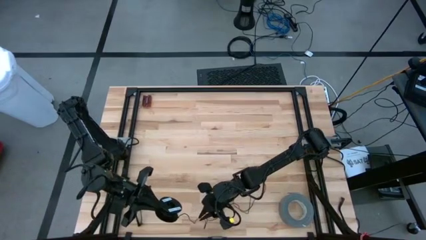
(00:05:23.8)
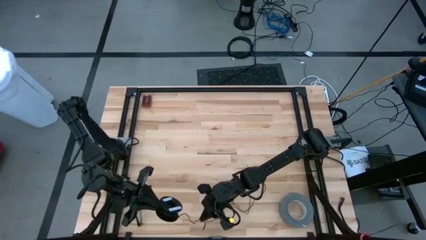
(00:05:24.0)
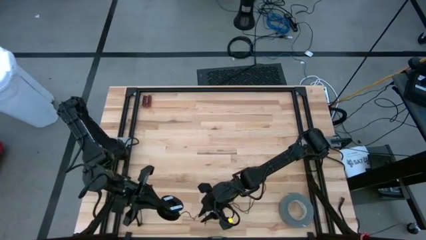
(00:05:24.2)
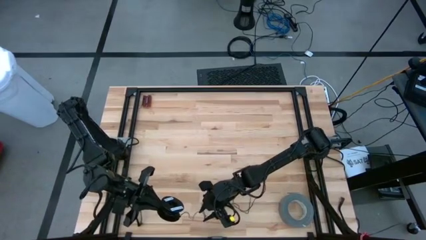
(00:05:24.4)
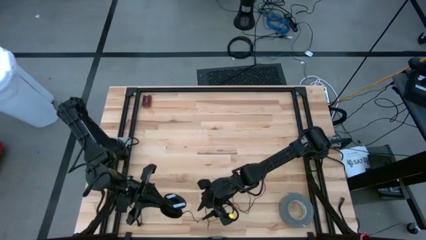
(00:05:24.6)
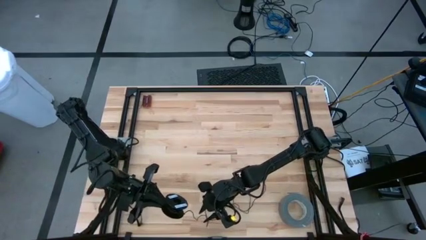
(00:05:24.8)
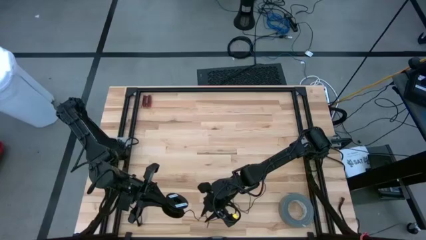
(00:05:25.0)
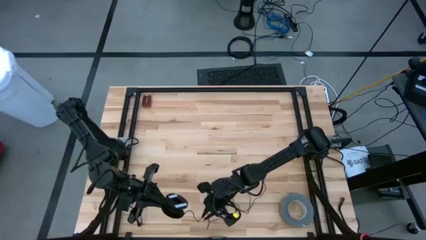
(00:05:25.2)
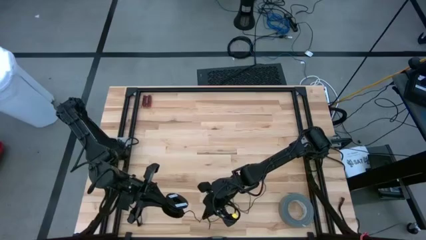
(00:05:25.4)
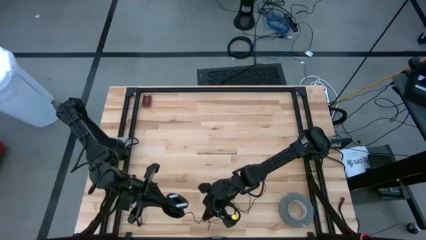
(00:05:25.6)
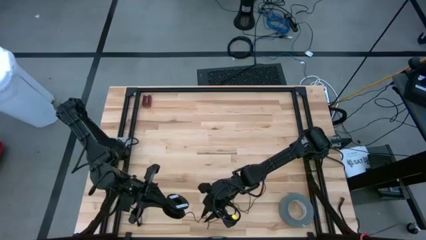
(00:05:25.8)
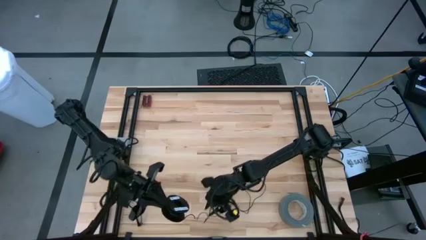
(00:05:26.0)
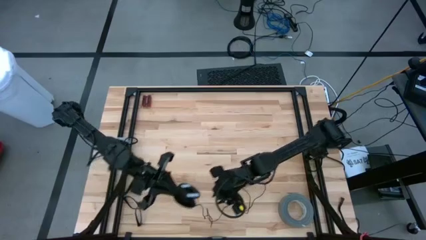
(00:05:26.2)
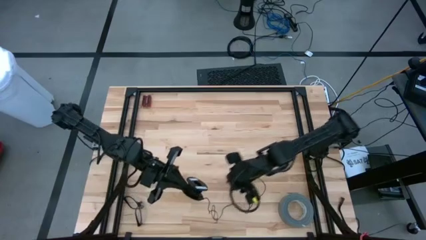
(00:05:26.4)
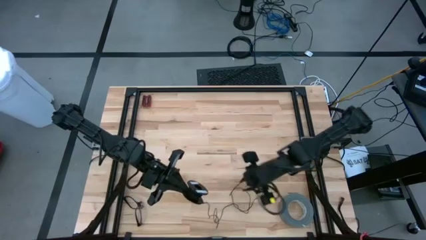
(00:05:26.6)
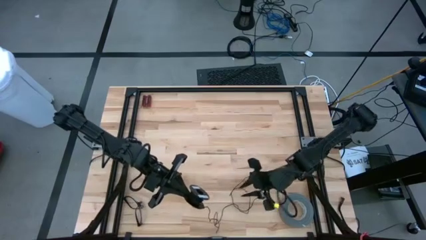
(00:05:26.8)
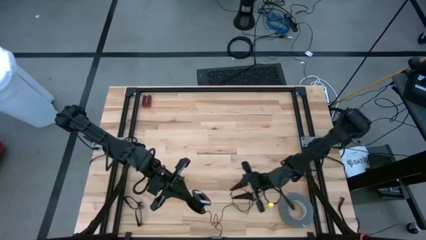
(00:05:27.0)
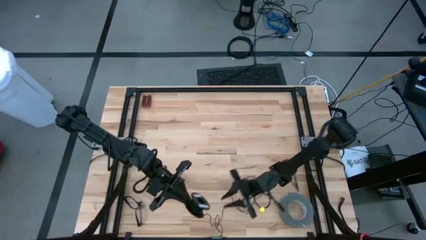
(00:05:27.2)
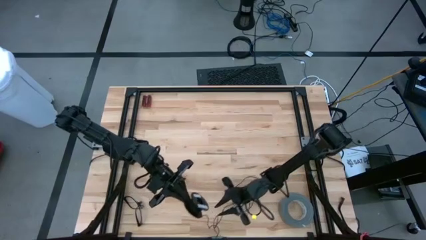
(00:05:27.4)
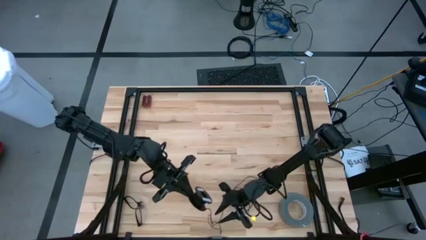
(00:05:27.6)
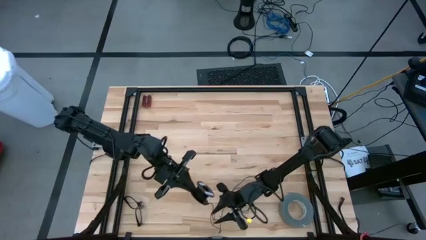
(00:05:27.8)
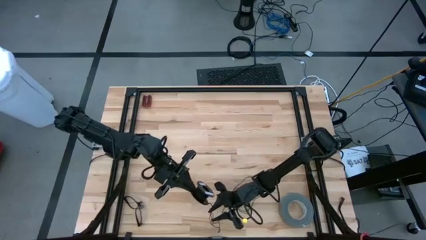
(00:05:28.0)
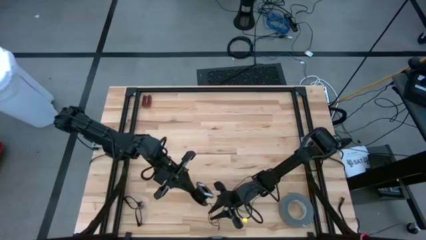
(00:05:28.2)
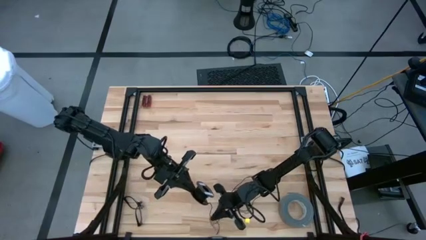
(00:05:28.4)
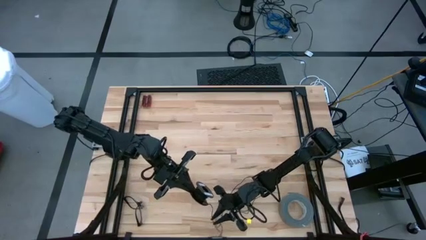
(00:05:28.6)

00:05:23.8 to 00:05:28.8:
Task: Coil cords
Coil the black wire on the spool

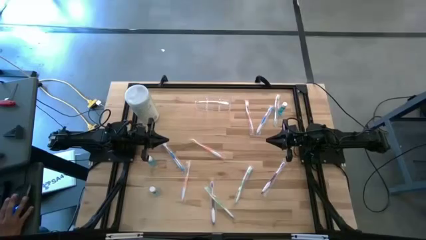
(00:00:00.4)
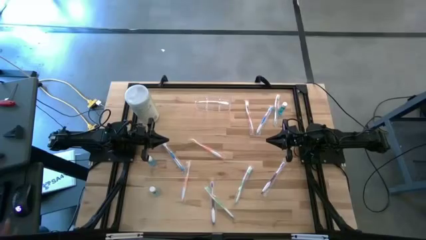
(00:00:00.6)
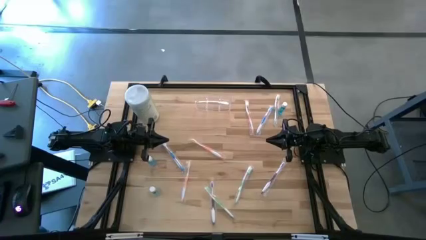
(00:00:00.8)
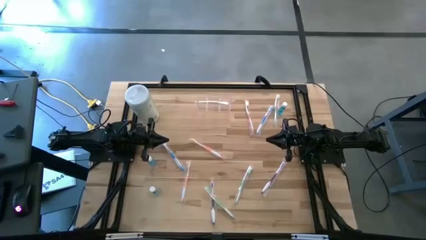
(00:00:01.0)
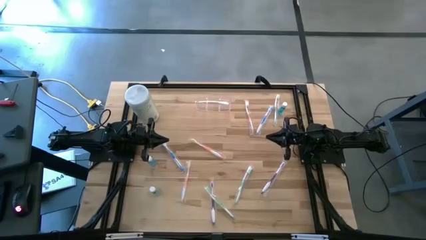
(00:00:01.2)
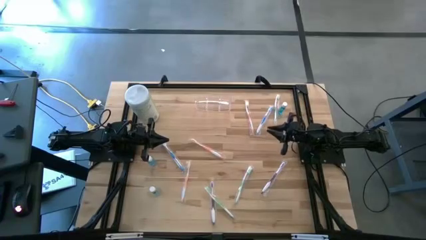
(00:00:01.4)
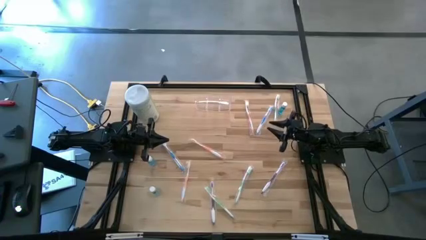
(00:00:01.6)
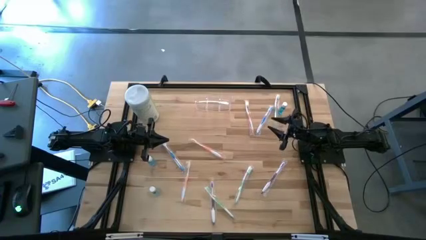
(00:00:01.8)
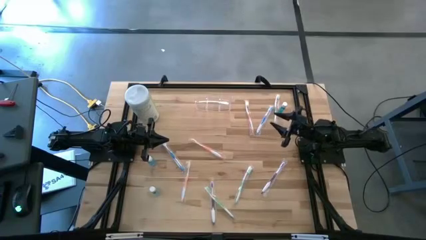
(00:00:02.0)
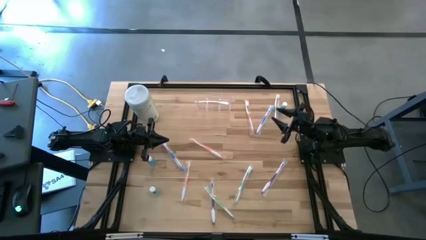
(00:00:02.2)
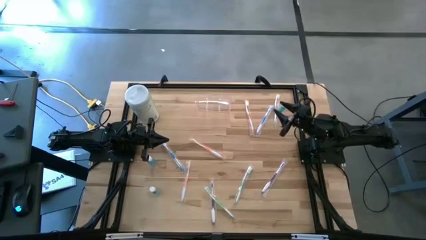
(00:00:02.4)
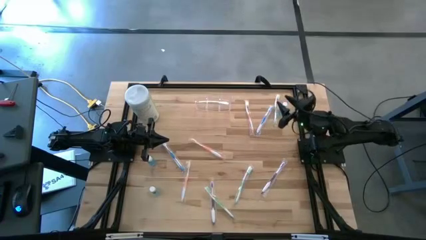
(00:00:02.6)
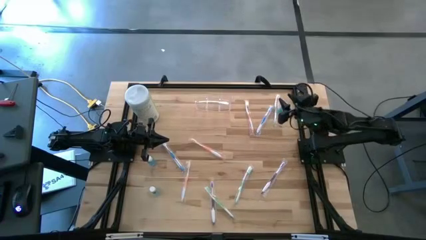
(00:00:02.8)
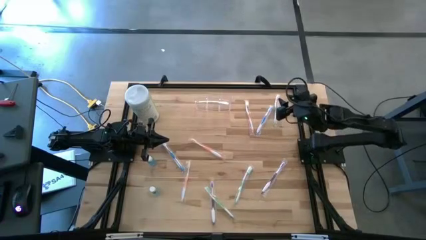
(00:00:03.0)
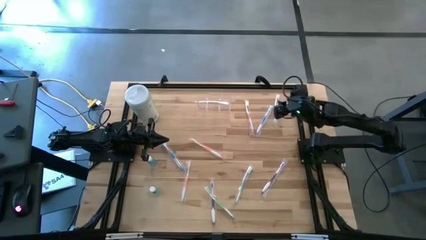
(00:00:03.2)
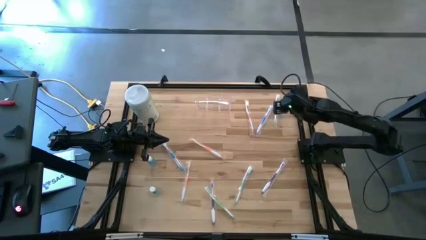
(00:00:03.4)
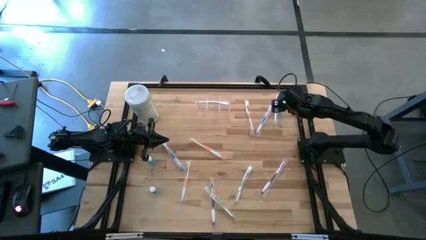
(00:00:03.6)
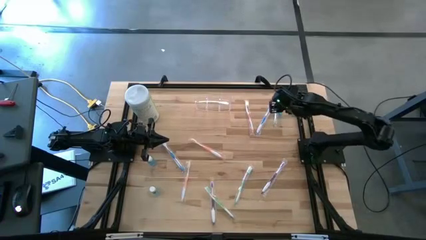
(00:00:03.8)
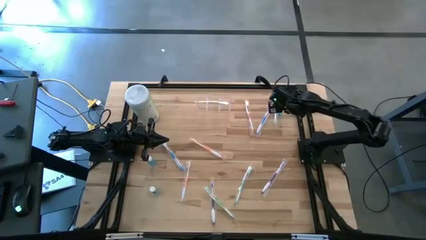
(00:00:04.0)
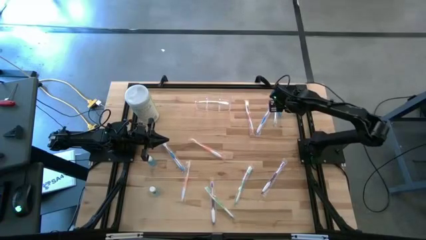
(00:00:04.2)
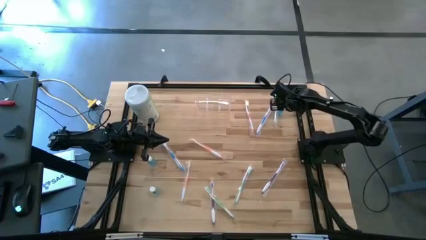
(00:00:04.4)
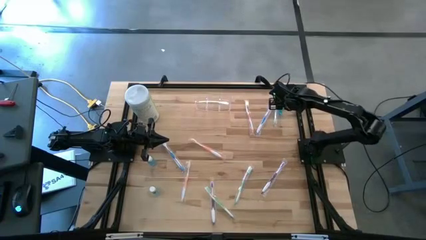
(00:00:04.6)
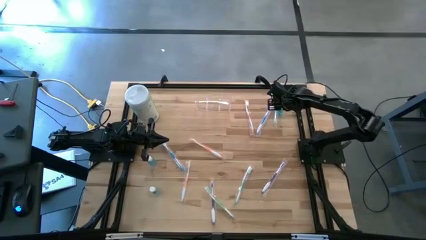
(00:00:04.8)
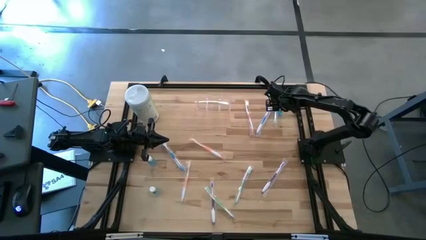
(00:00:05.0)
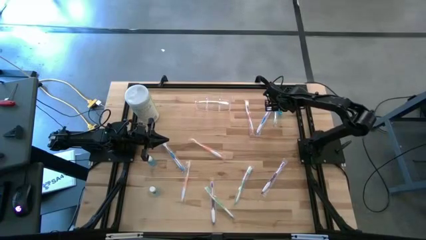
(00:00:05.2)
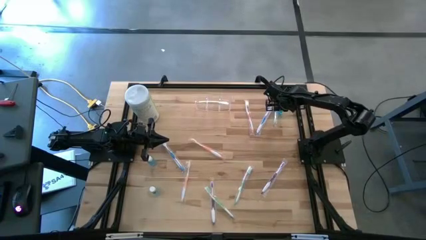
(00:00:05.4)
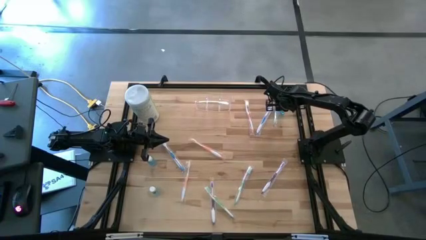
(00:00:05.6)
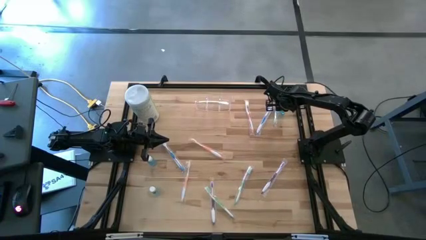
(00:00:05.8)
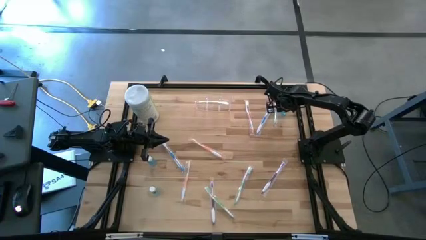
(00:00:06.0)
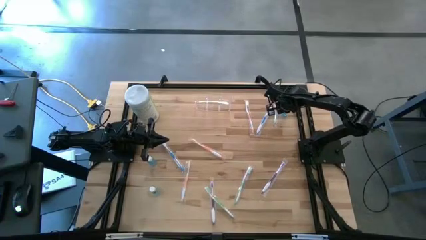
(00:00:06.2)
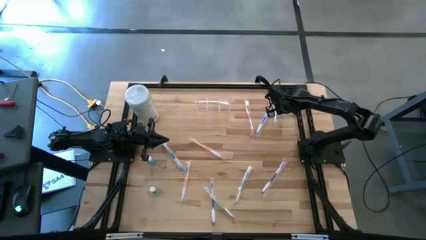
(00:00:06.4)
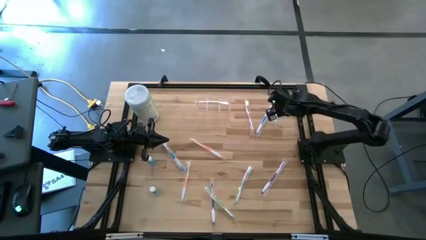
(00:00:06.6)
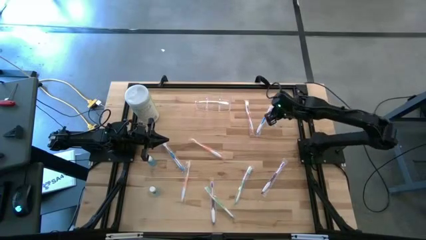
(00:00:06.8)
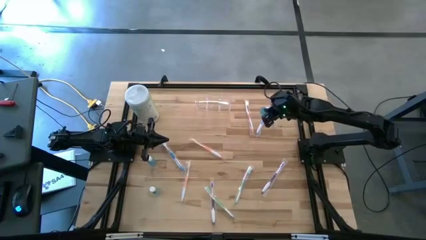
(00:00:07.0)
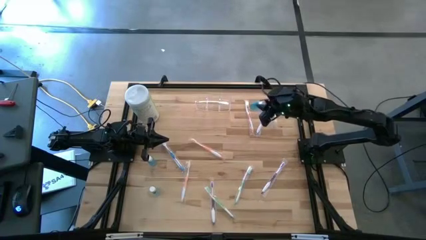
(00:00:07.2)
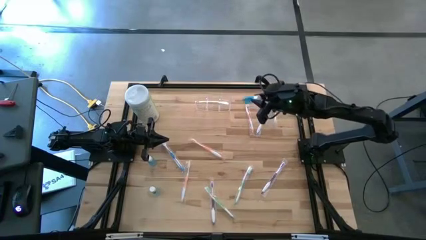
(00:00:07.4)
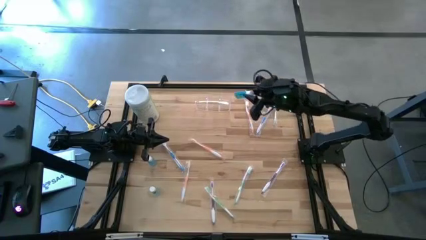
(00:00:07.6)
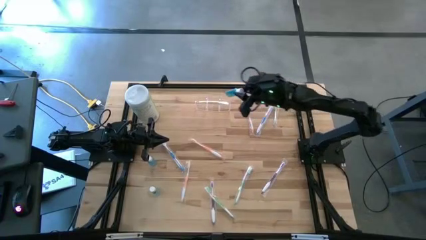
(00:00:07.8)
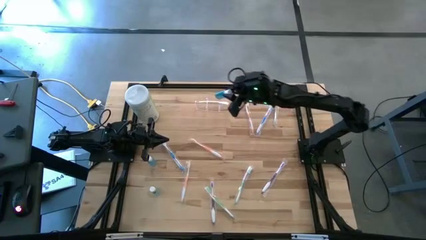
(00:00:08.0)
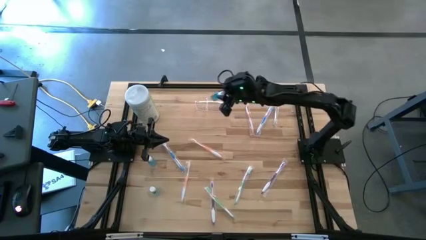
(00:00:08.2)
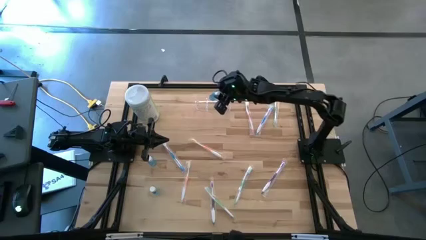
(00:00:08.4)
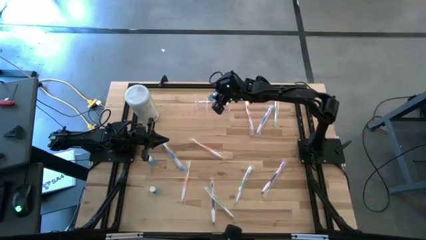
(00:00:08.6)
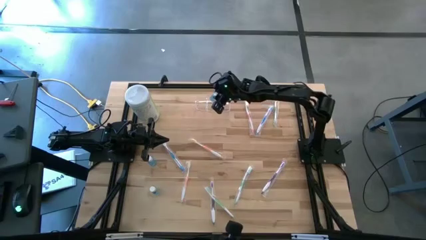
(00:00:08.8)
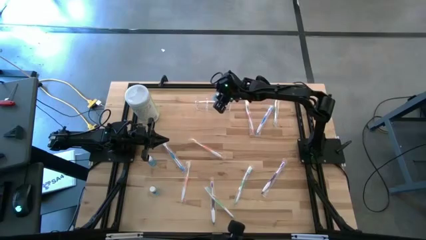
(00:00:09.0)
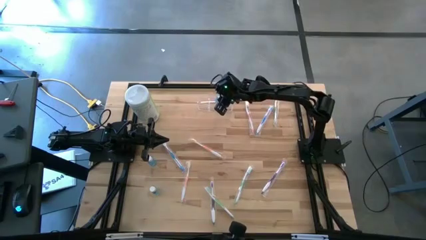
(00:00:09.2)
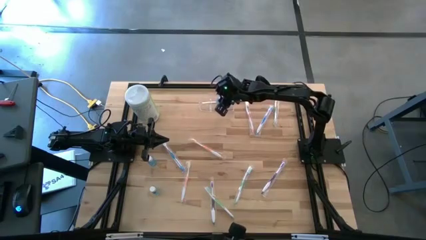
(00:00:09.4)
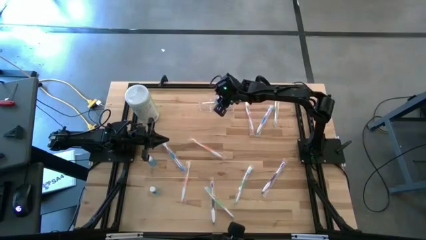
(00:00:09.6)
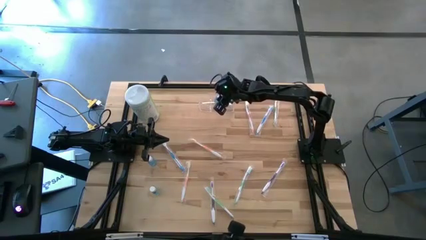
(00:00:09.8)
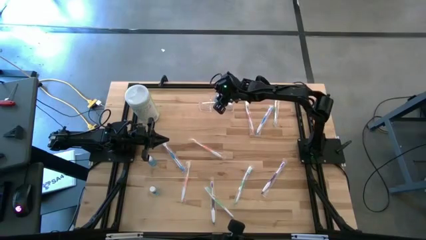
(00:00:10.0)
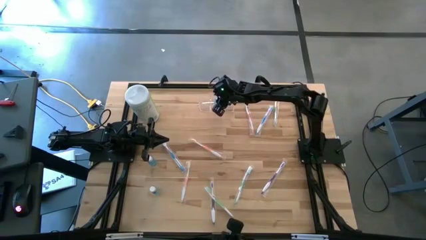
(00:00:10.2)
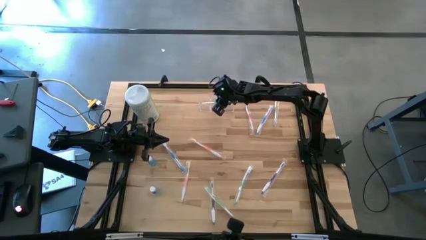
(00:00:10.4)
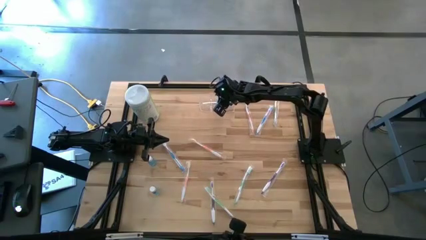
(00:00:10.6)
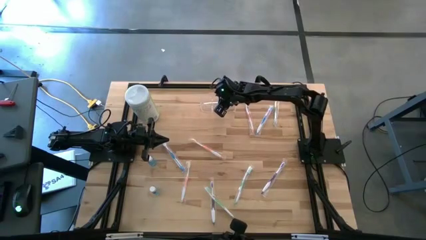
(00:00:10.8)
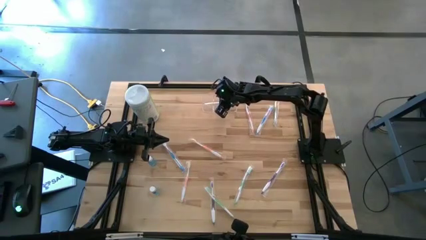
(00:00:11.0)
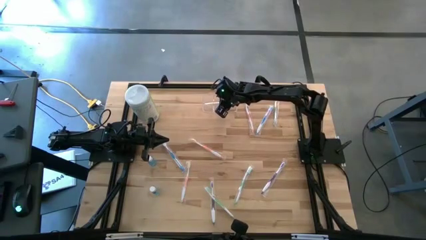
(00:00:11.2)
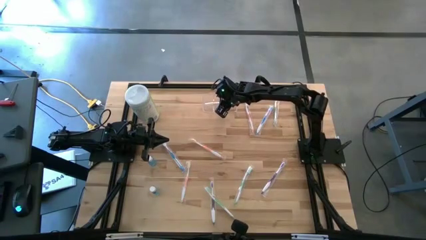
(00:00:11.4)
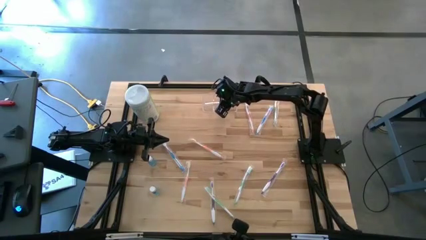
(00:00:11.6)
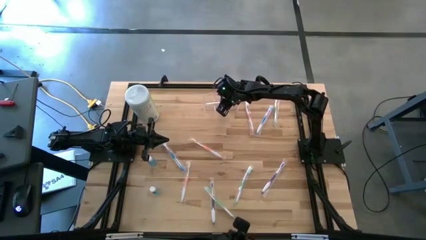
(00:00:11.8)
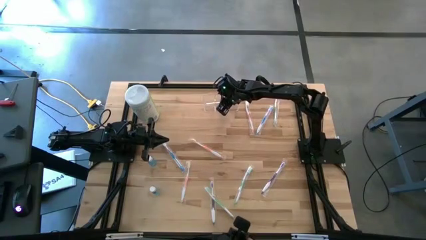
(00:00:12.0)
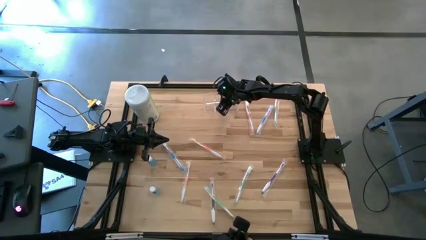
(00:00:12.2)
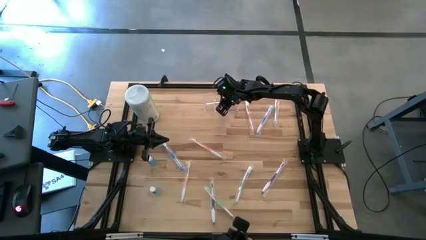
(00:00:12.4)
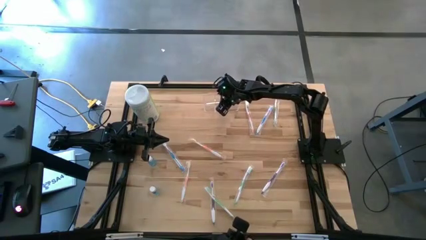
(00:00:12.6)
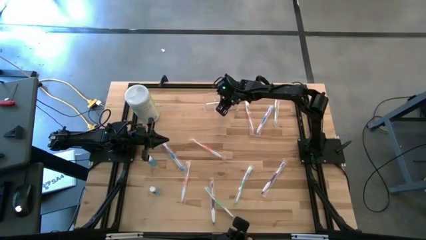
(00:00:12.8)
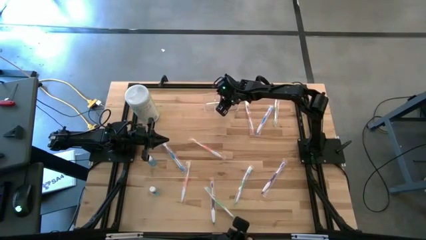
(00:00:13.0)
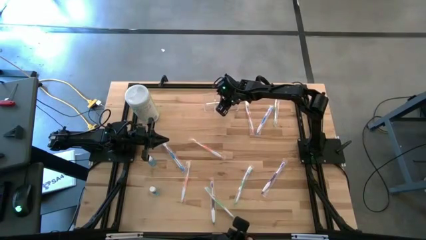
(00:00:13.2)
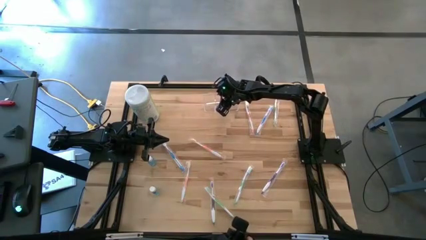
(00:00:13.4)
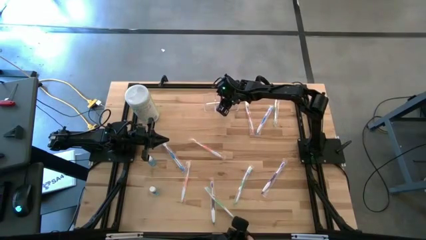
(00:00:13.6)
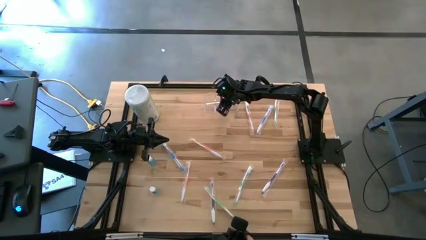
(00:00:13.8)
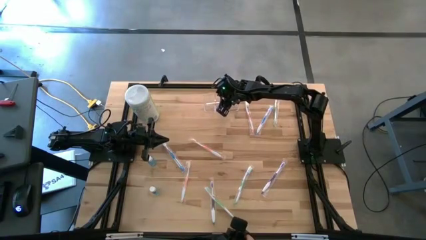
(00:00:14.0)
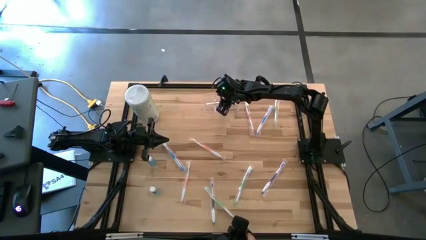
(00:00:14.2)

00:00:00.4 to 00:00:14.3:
Task: Pick & Place toothbrushing station
Put the top right mouthwash into the transparent organizer
